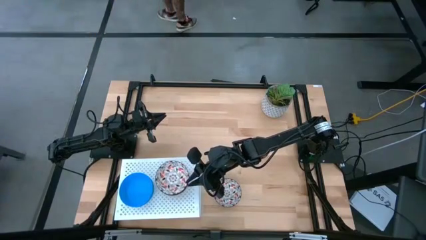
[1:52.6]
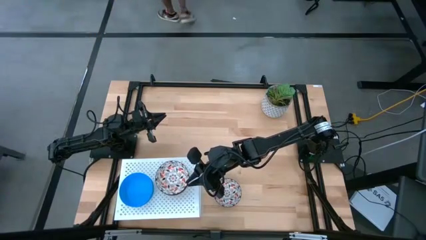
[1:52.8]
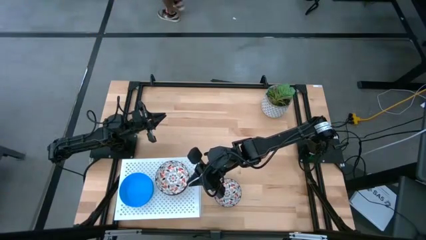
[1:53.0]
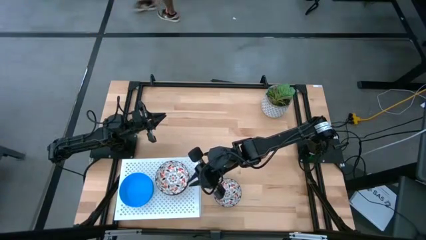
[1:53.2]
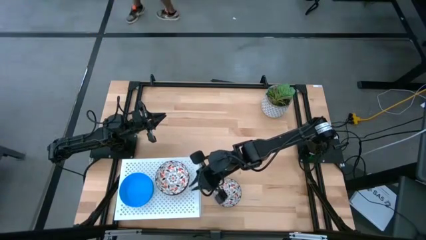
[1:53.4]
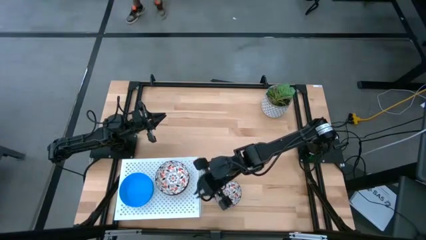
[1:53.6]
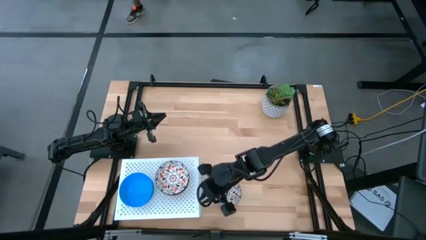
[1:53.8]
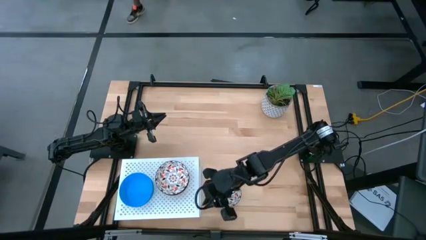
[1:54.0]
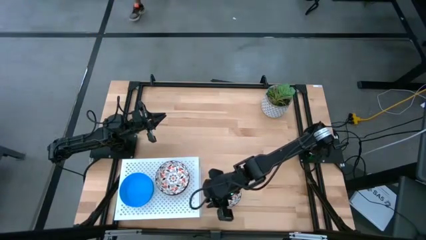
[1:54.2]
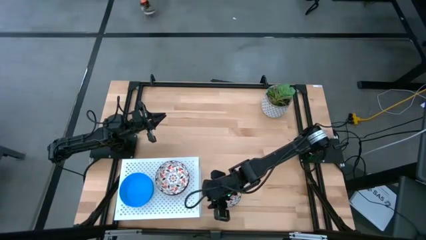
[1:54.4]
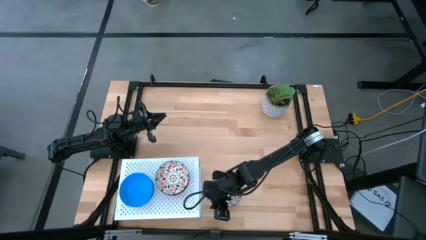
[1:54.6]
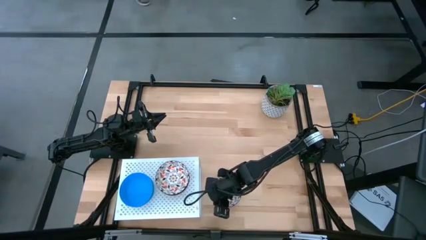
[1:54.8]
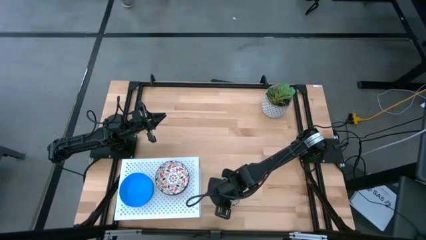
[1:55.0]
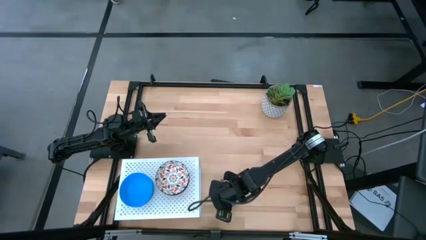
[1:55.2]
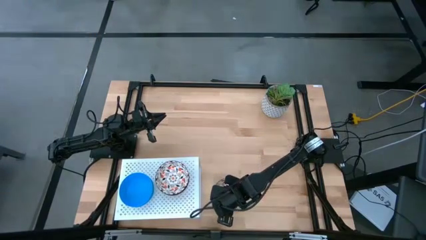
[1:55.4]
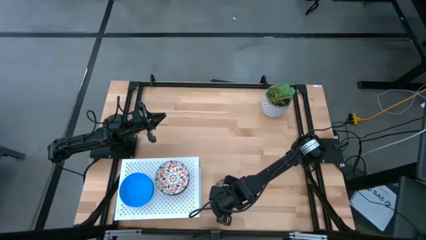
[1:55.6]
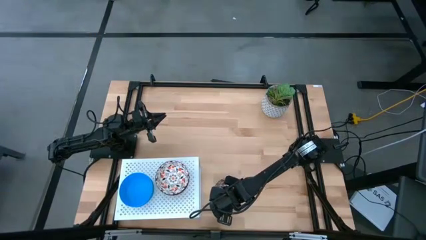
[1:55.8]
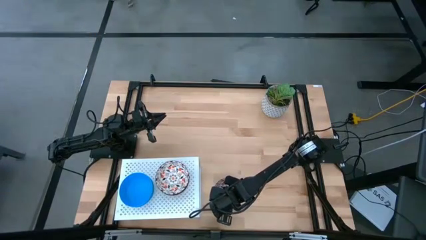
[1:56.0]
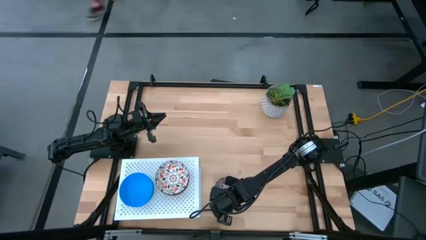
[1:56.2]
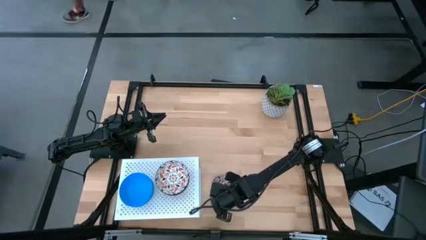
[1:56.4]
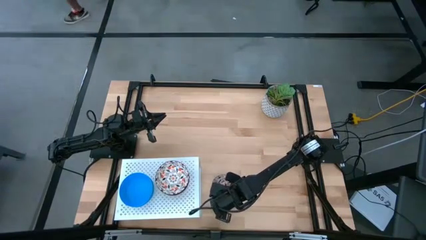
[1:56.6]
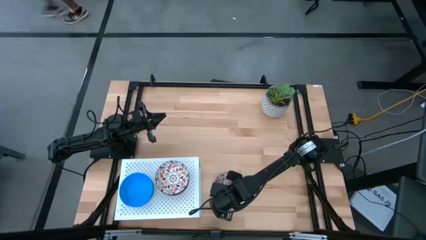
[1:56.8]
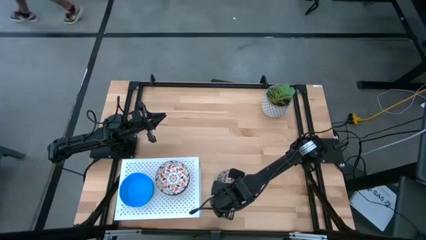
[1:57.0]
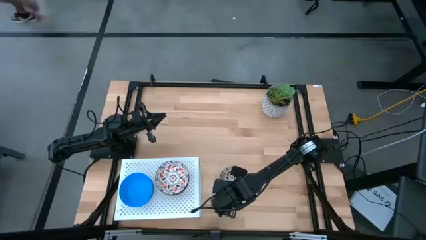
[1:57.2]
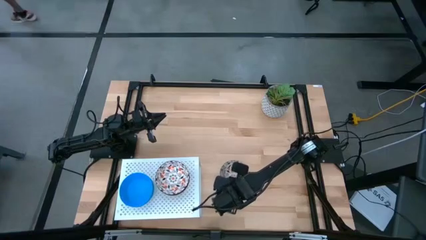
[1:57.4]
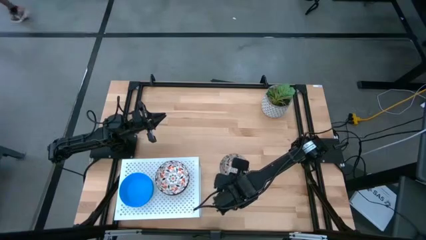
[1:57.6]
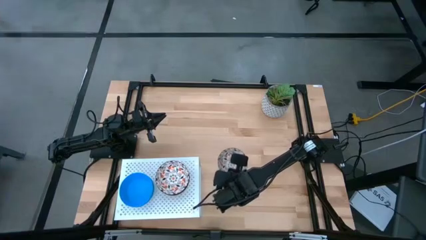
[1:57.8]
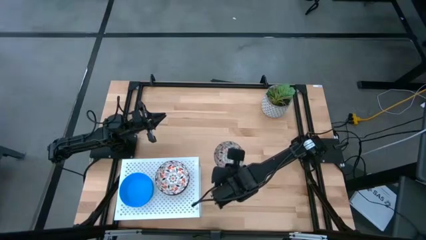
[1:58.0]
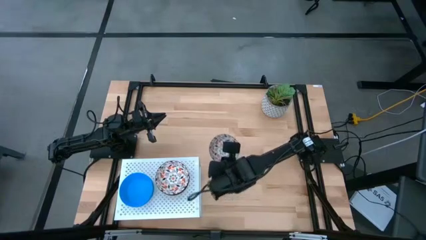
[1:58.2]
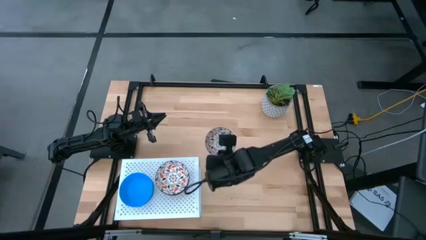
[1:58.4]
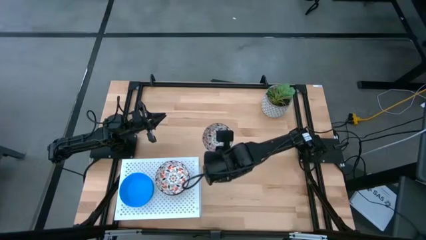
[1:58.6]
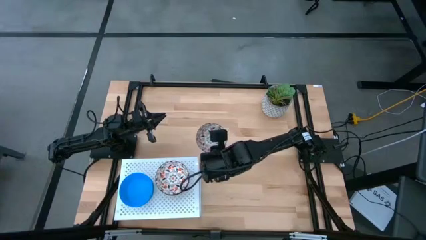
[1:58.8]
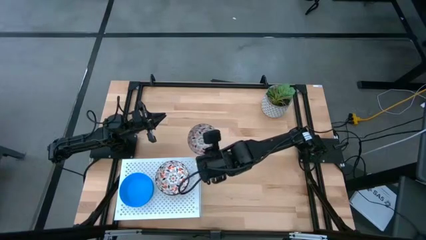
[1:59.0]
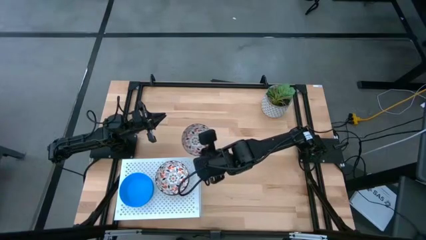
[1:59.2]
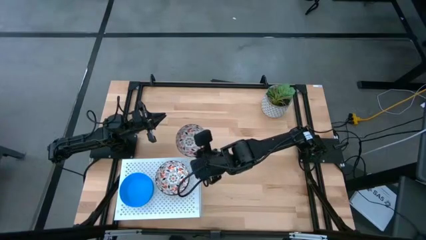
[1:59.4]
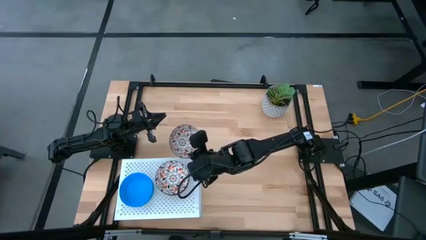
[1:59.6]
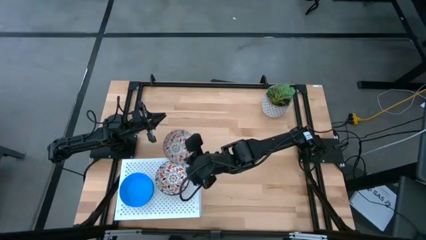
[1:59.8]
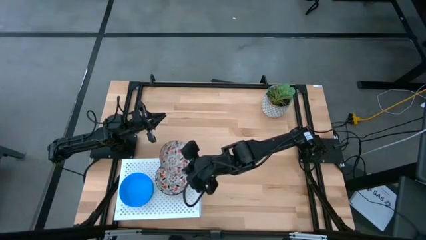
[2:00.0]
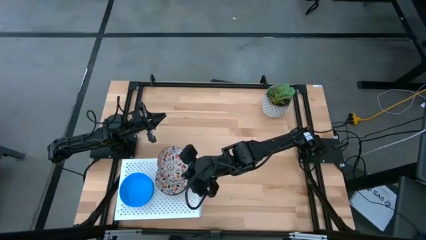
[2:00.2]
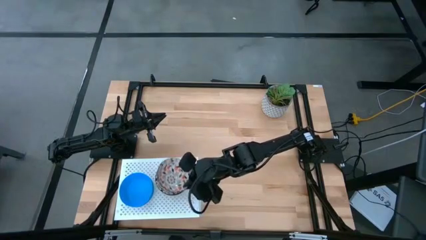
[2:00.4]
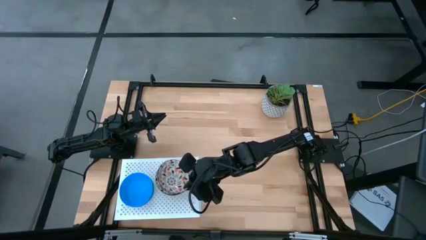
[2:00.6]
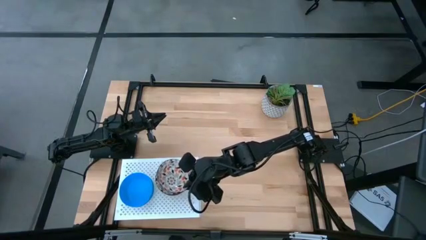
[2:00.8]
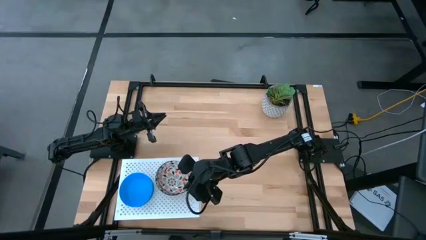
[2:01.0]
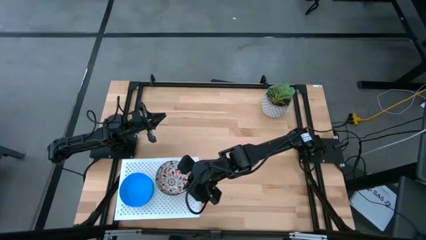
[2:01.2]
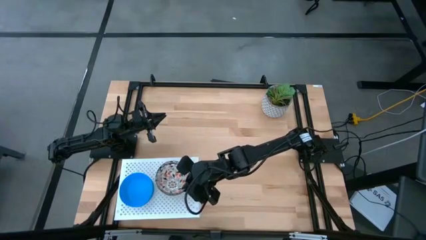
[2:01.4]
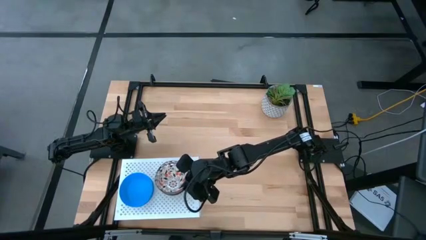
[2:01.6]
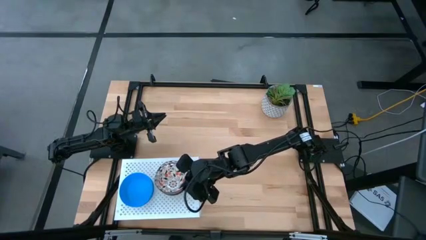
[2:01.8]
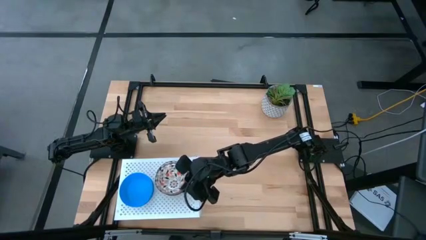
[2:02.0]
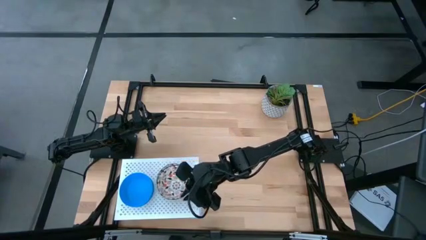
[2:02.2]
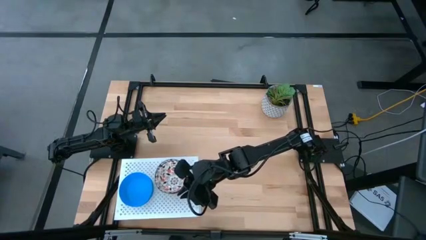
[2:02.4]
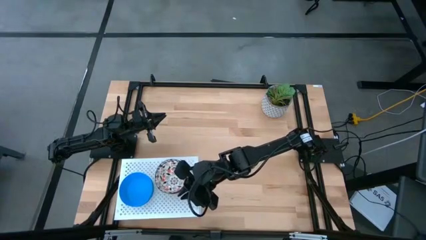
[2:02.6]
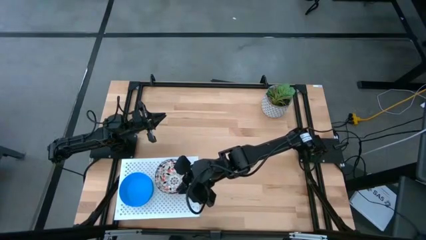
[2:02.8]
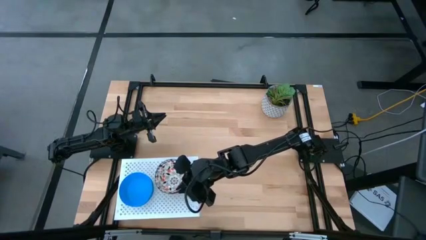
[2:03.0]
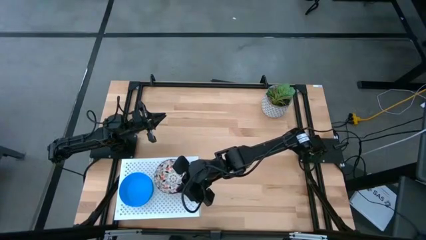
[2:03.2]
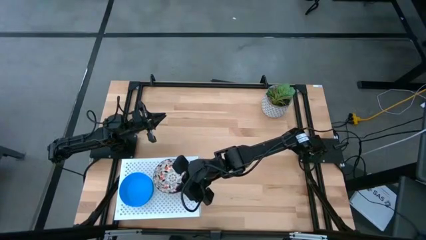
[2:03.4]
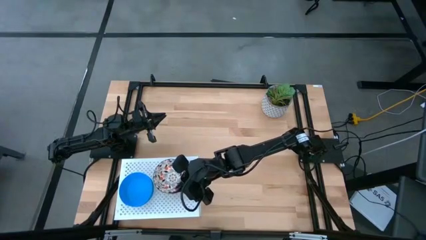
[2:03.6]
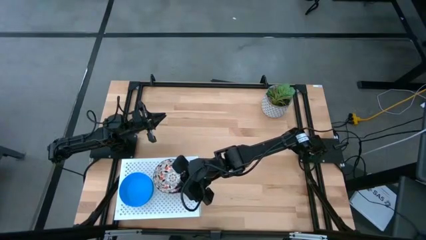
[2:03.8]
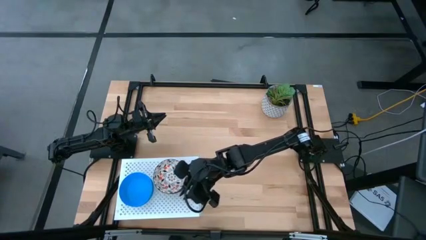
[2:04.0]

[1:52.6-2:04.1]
Task: Pick & Place Mini bowls
Stack the orange patterned bowl on top of the stacked orange patterned bowls on the shelf

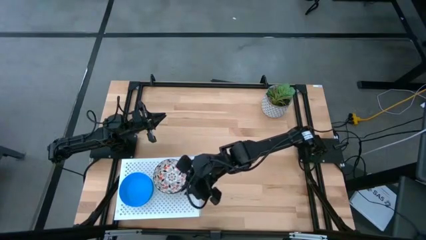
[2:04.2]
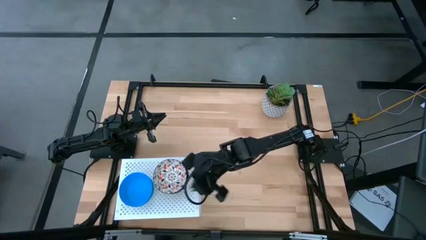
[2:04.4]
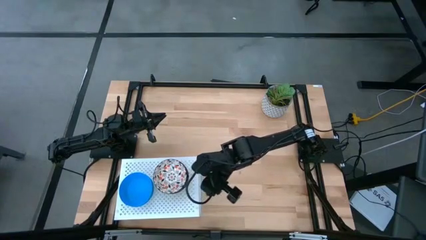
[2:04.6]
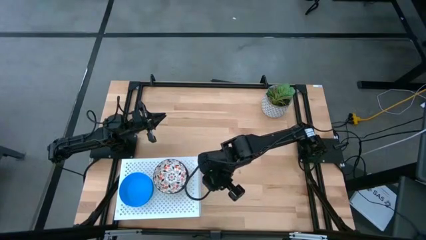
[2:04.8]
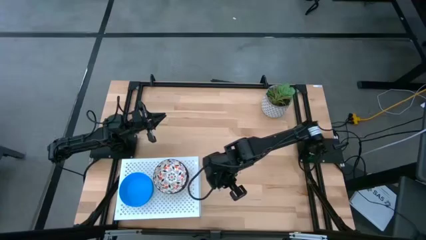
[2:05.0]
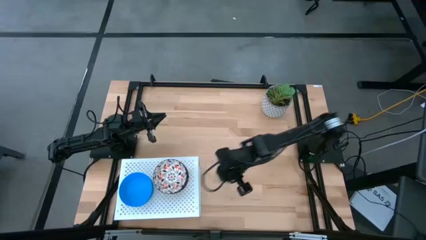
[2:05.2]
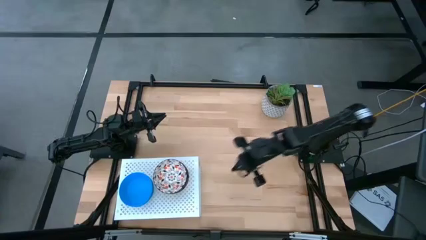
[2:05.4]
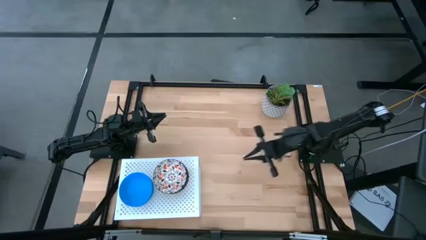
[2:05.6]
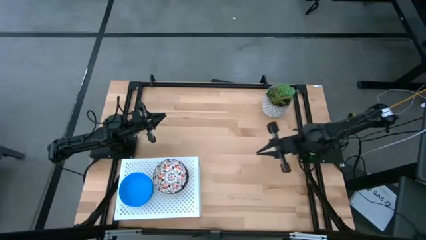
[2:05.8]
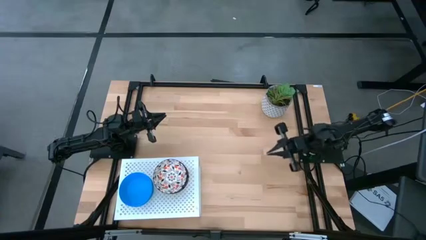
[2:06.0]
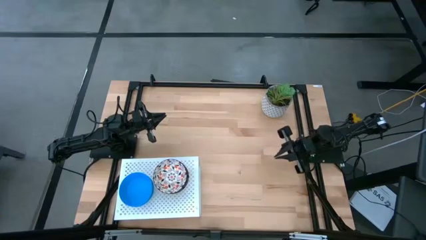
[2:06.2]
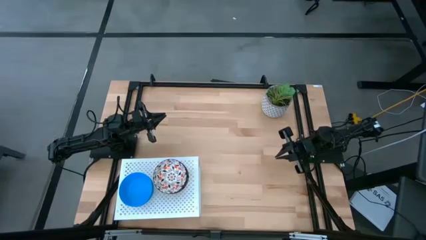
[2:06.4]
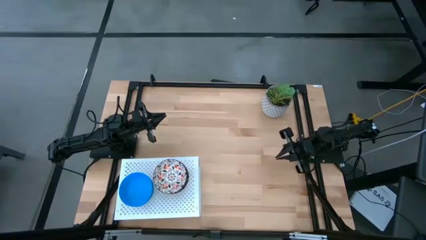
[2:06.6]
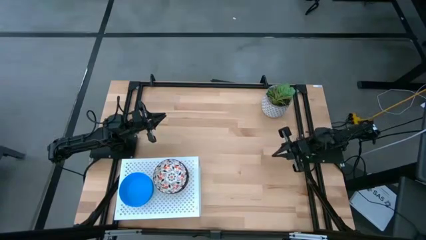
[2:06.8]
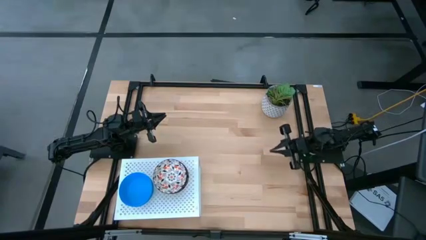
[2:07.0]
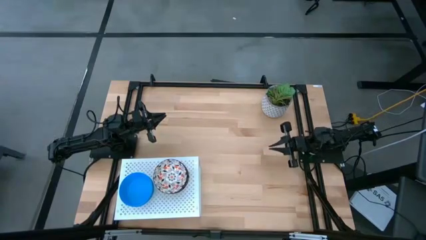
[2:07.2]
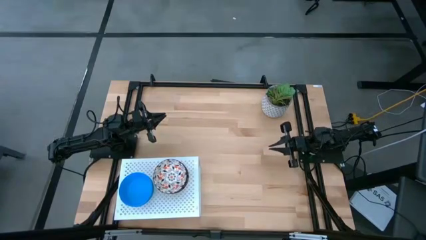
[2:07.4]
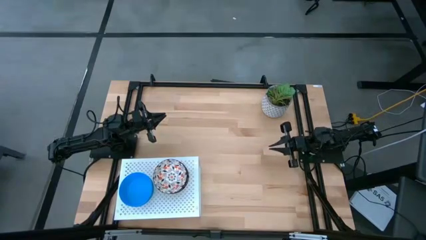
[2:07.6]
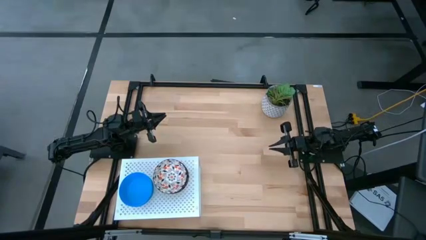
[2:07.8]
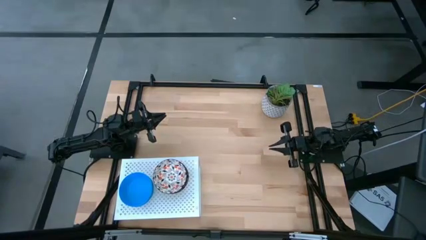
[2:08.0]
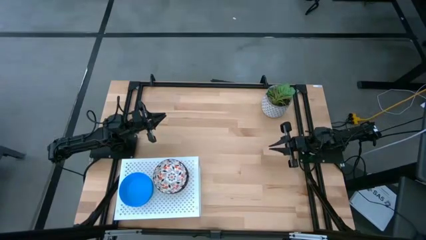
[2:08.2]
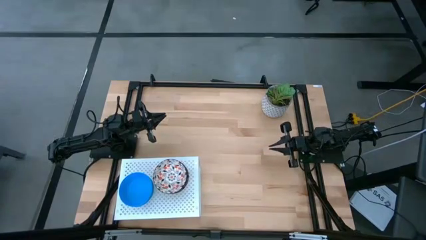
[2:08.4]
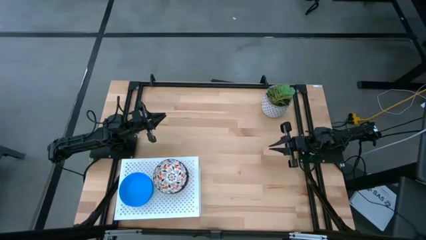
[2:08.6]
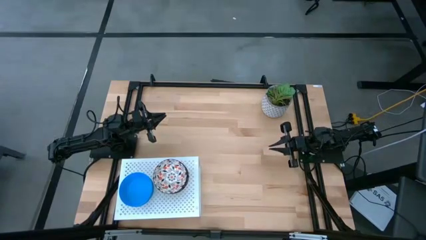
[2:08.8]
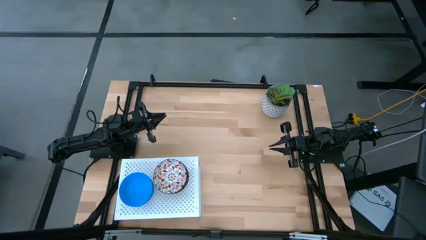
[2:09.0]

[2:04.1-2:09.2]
Return to Home Position
